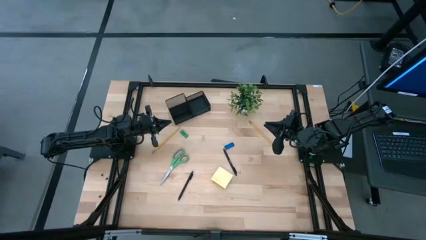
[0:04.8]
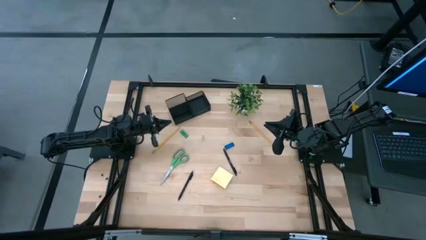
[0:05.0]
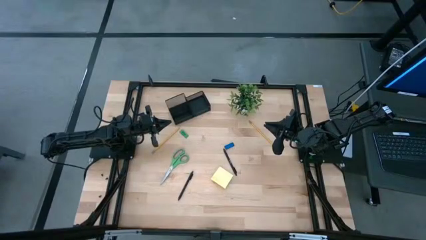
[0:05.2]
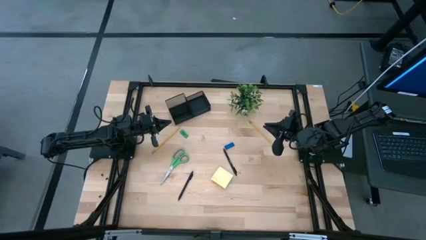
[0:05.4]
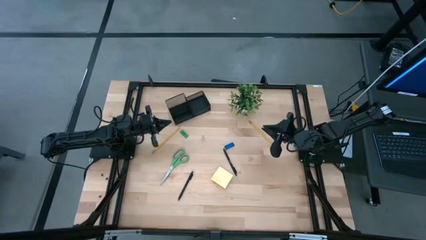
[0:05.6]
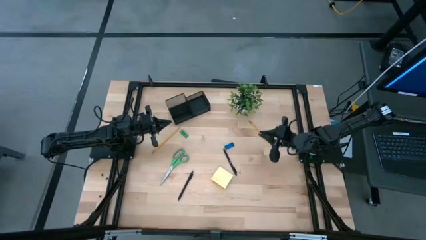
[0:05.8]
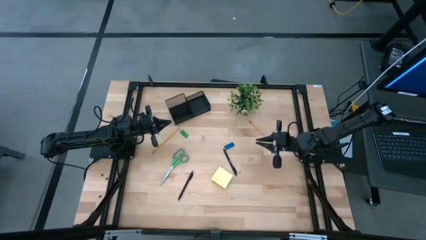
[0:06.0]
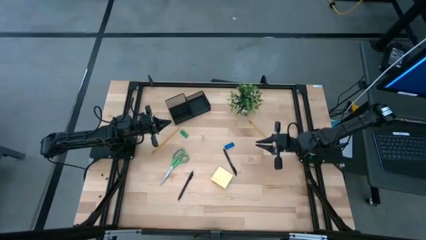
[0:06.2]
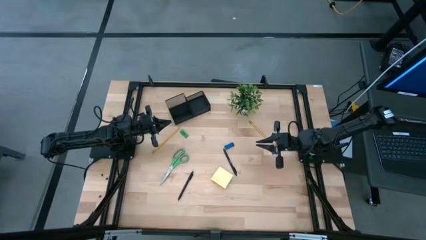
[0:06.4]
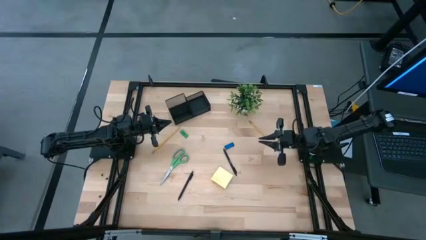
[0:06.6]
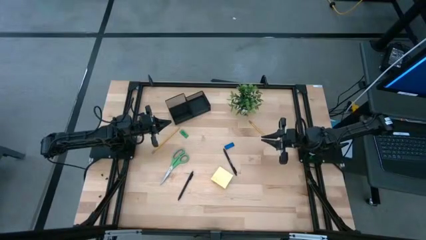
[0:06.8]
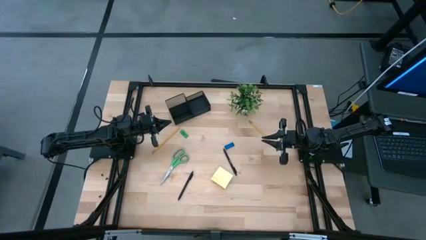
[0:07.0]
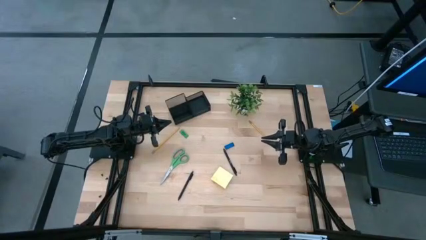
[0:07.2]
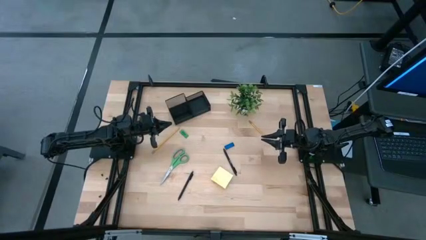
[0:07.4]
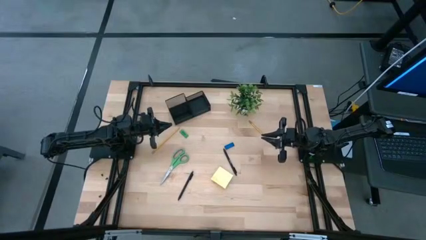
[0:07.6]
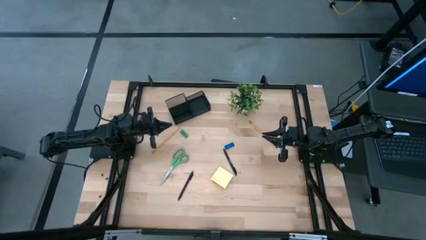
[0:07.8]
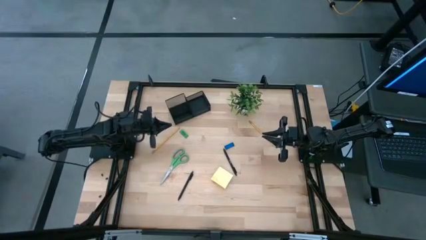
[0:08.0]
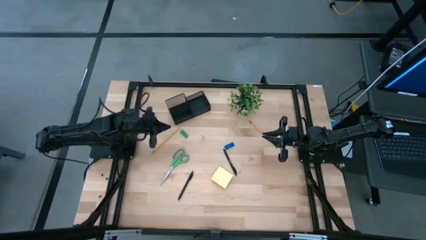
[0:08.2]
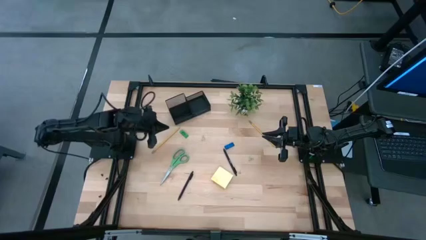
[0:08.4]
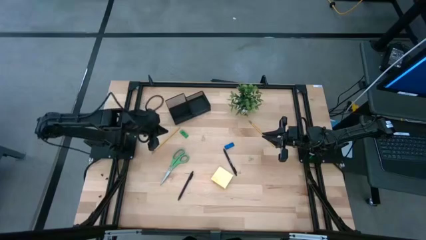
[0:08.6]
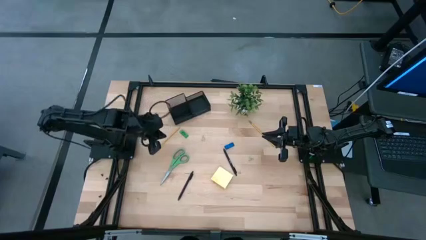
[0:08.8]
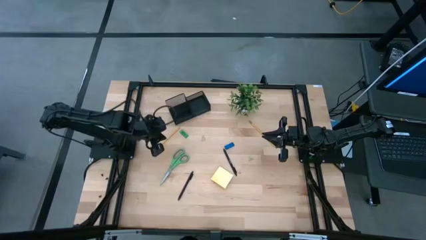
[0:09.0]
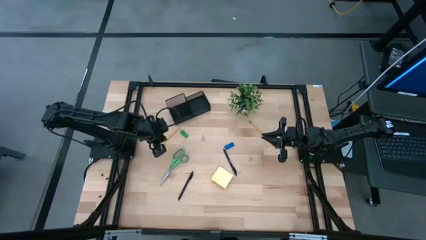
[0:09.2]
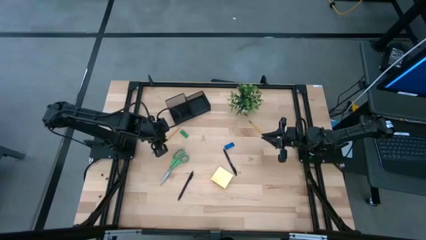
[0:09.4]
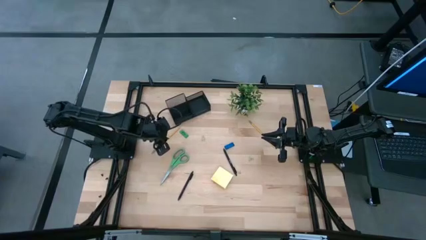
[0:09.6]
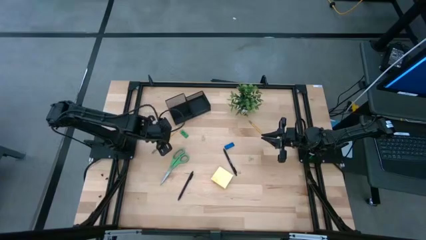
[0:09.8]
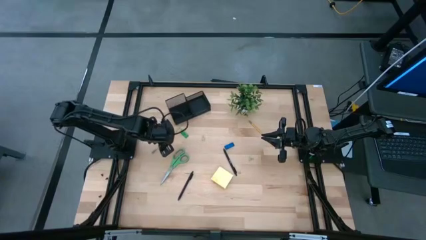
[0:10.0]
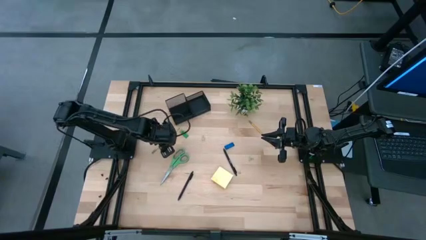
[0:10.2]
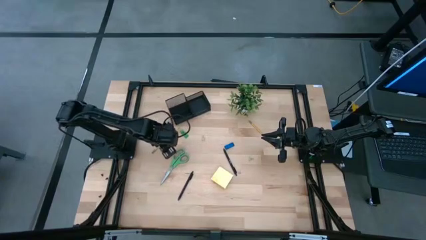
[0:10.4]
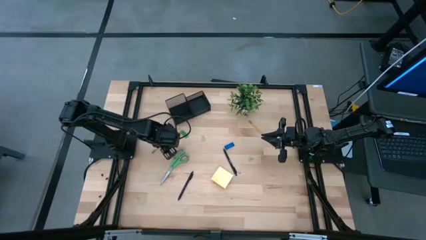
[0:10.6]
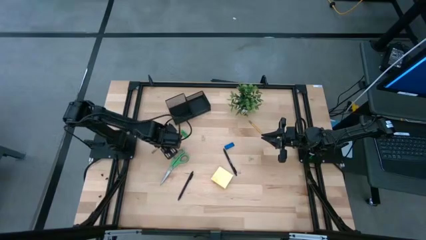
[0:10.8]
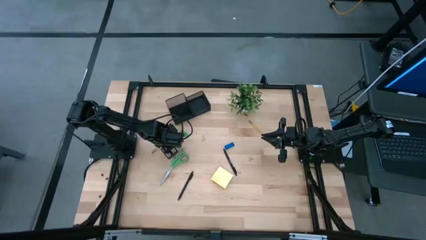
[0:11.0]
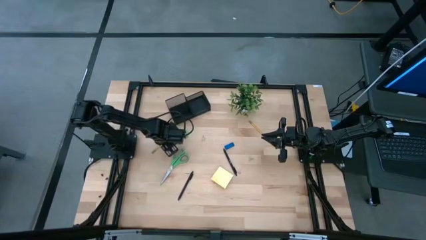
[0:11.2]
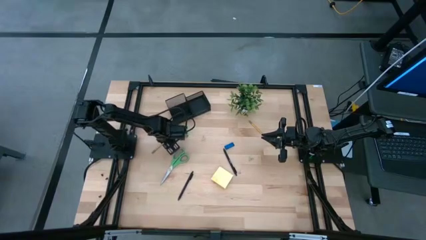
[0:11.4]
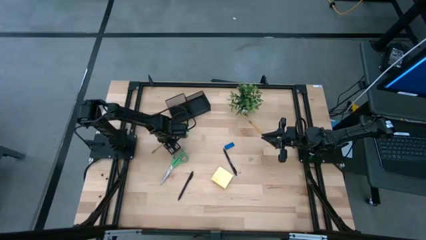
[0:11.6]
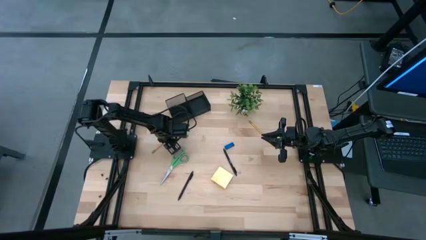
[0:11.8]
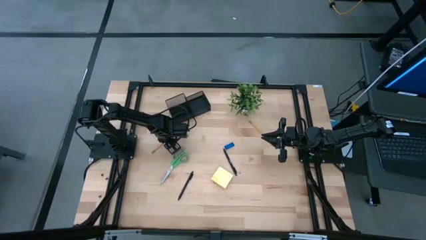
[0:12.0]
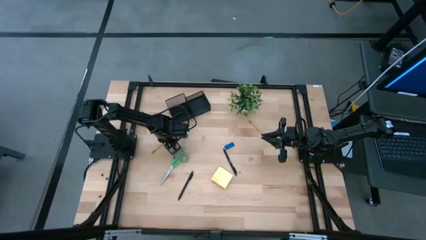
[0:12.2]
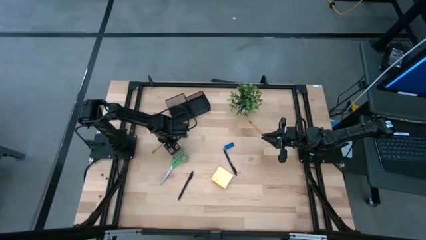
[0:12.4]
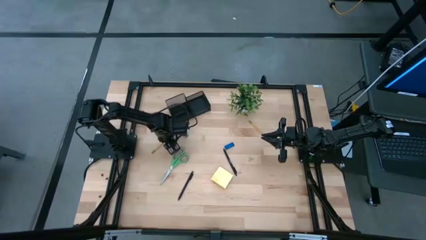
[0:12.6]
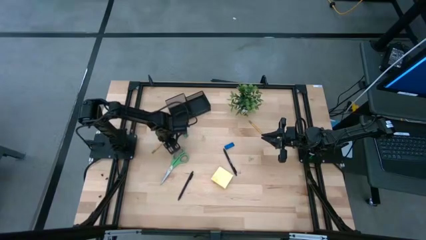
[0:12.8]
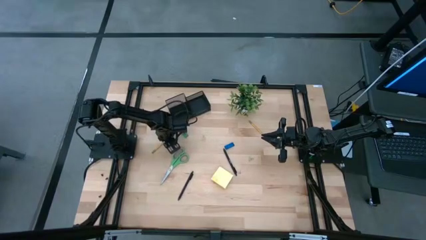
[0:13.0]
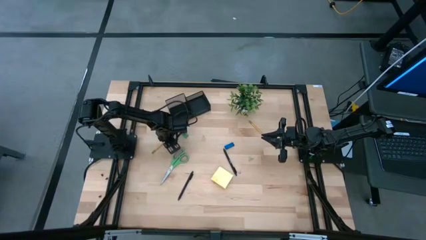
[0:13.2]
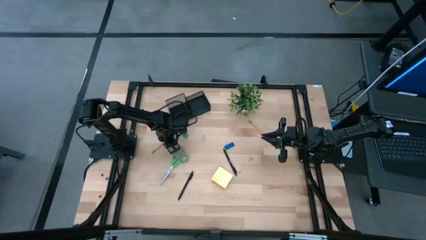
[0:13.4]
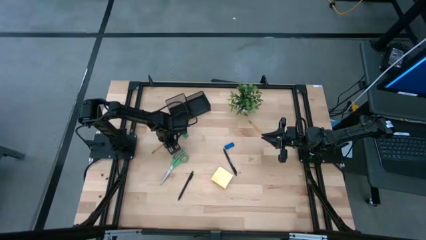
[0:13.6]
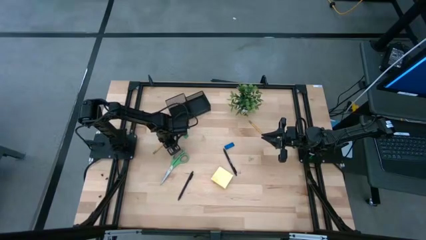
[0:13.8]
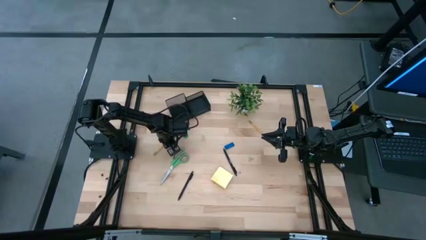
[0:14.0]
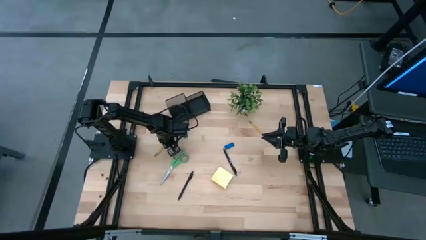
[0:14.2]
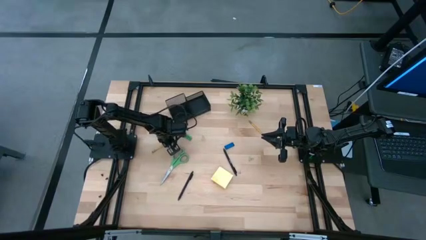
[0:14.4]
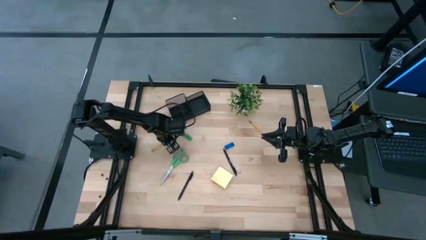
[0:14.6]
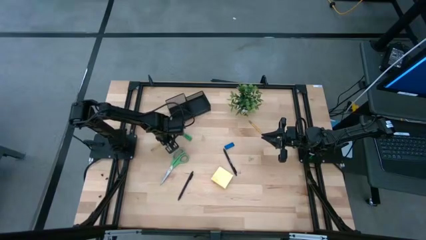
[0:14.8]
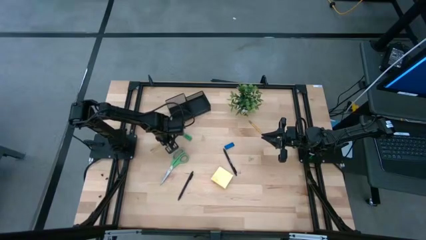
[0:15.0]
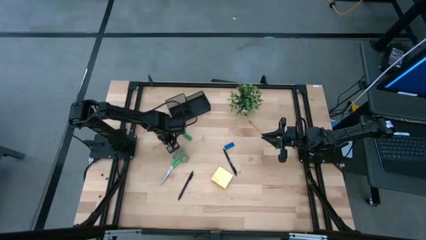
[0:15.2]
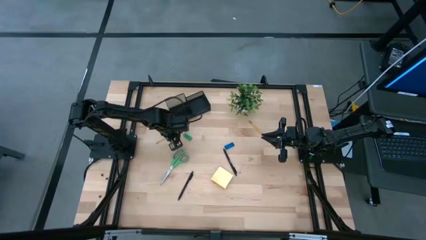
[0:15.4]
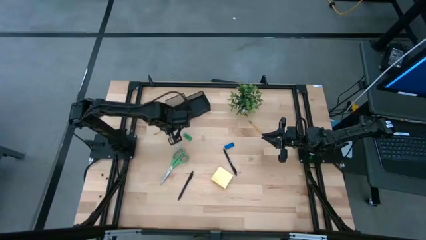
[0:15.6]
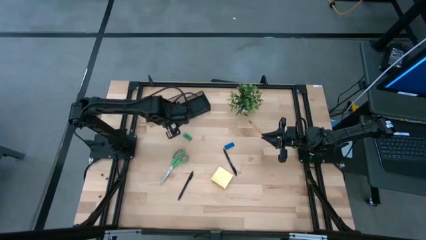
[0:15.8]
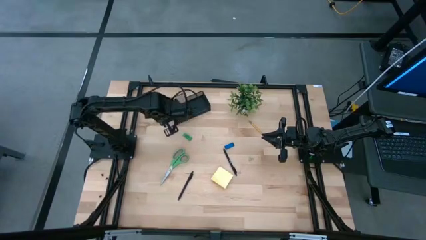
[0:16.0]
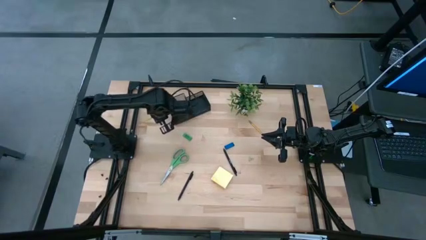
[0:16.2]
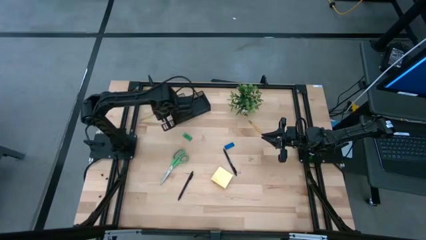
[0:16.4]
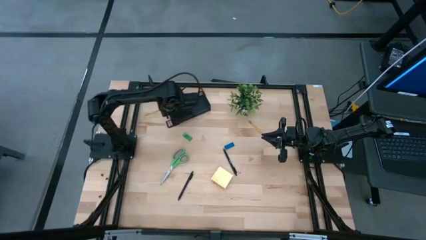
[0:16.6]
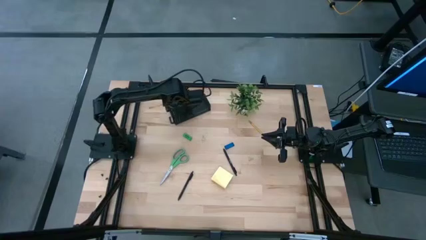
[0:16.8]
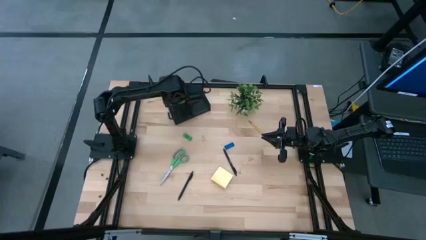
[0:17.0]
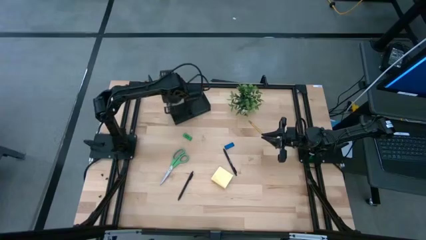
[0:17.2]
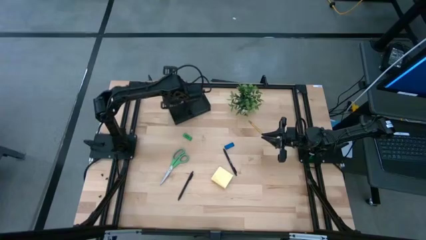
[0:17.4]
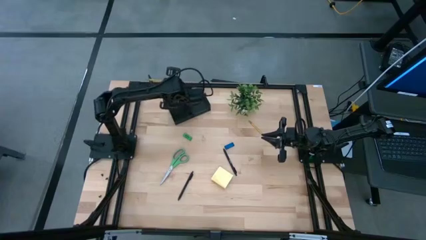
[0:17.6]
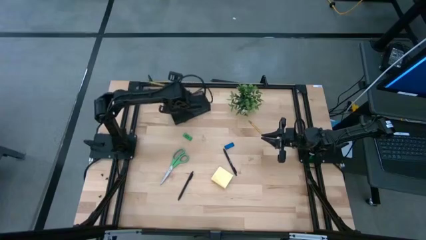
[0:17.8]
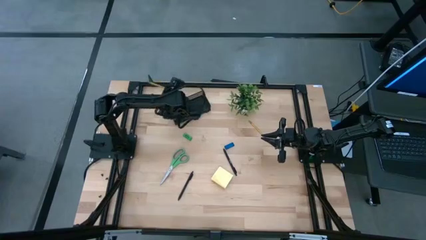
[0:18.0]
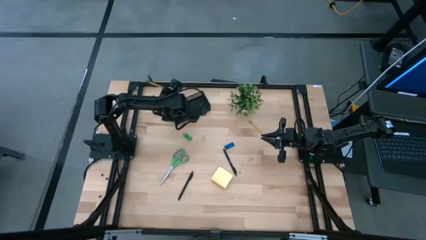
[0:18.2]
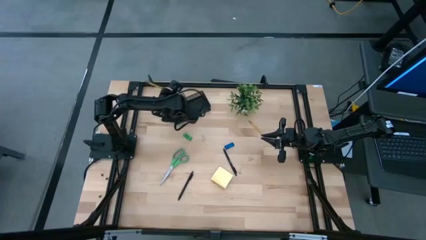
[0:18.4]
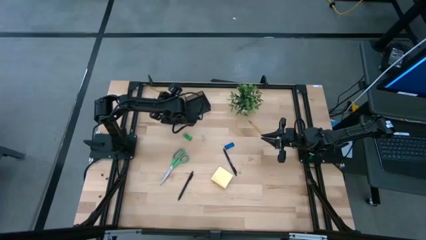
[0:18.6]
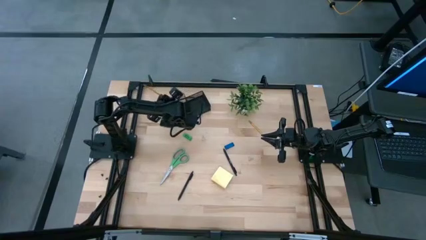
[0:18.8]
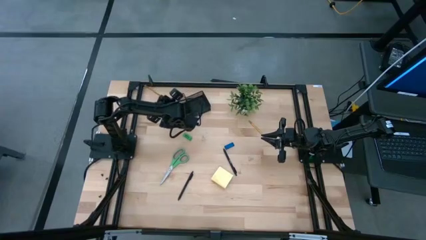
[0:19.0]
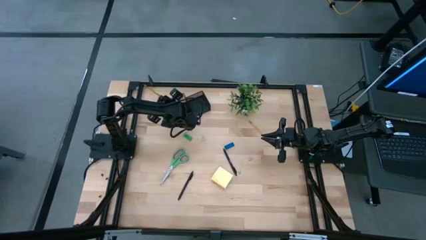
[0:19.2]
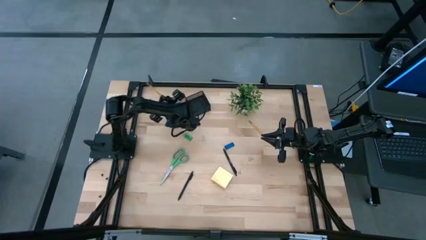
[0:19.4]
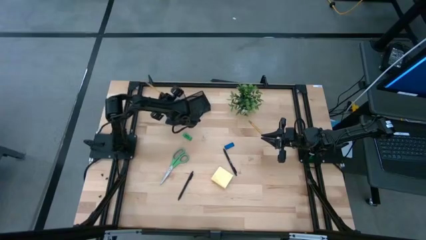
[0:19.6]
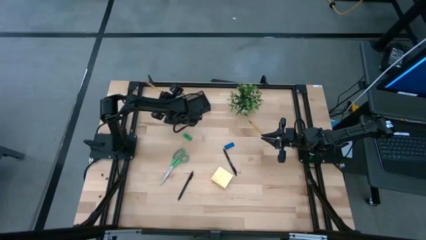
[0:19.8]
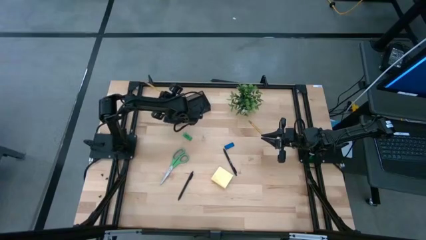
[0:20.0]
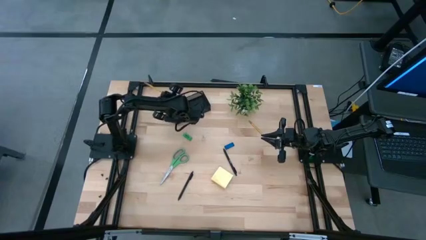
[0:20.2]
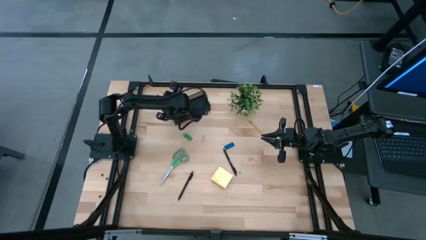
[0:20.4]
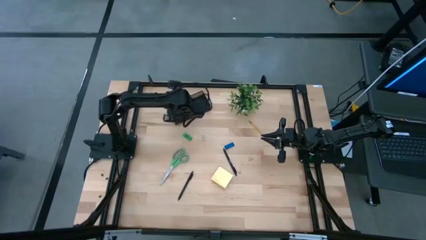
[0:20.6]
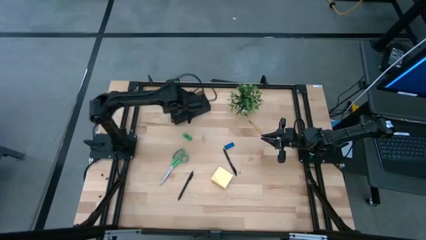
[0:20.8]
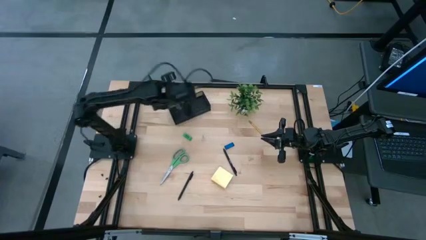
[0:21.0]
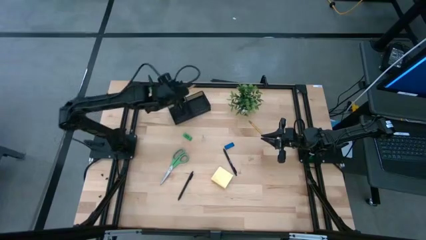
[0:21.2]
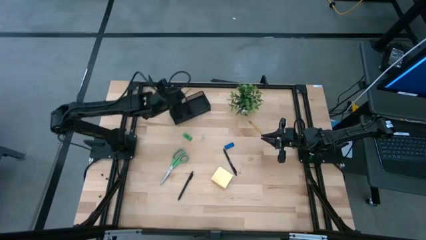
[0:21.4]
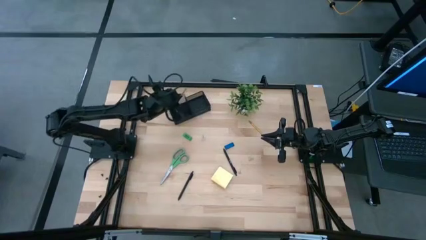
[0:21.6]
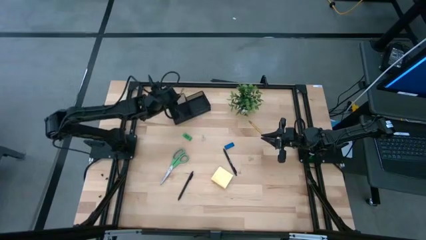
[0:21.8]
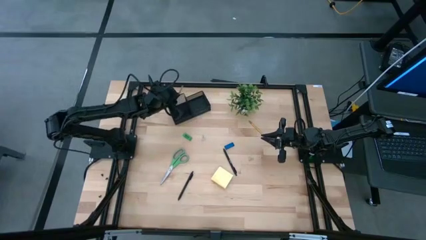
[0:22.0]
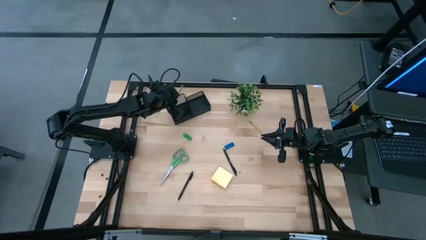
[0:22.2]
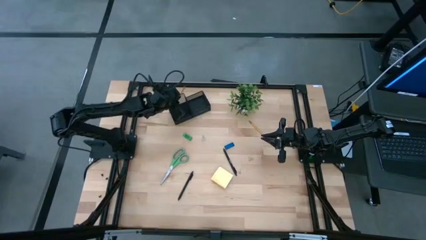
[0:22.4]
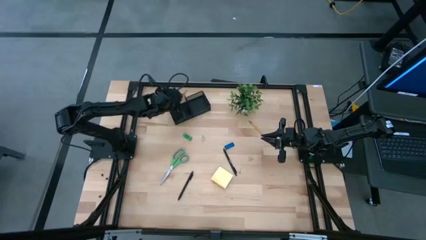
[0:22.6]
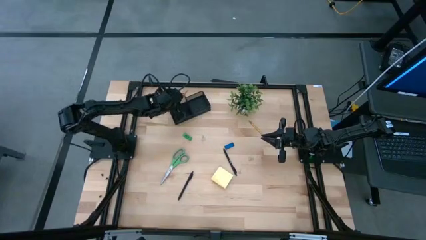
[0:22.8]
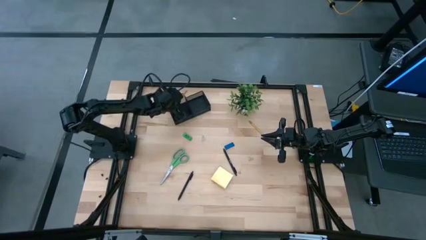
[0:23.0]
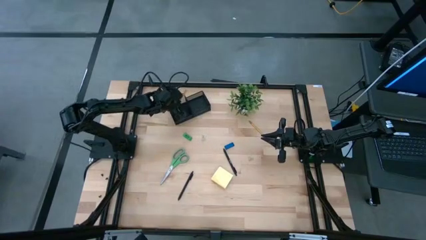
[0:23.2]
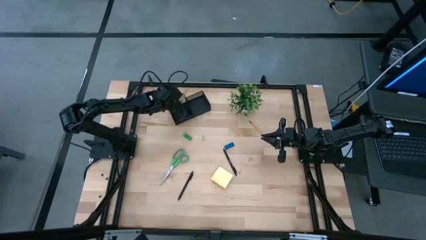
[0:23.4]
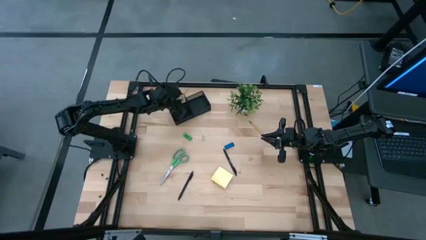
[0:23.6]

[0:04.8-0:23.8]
Task: Pick and place office supplies into organizer
Put the left pencil into the desk organizer
